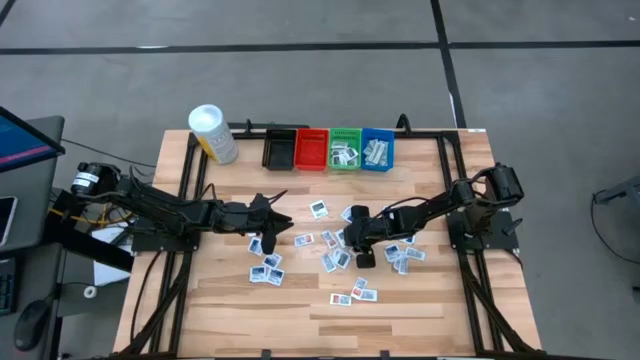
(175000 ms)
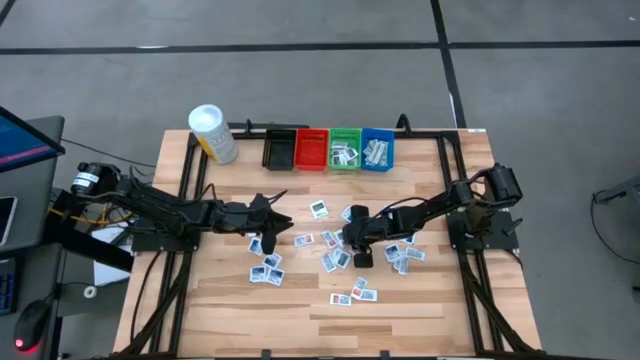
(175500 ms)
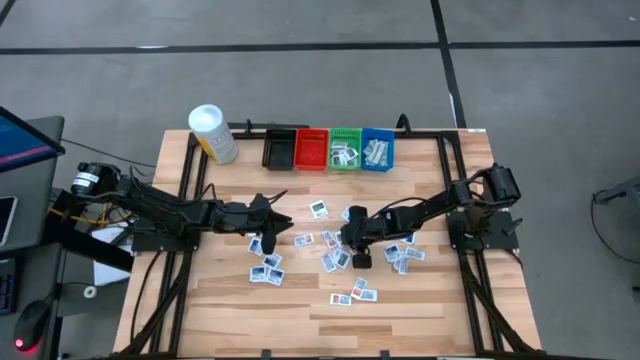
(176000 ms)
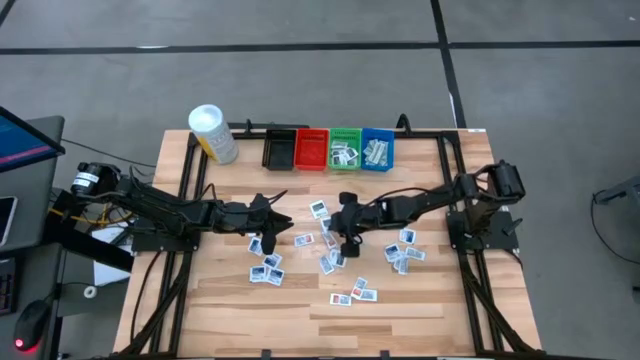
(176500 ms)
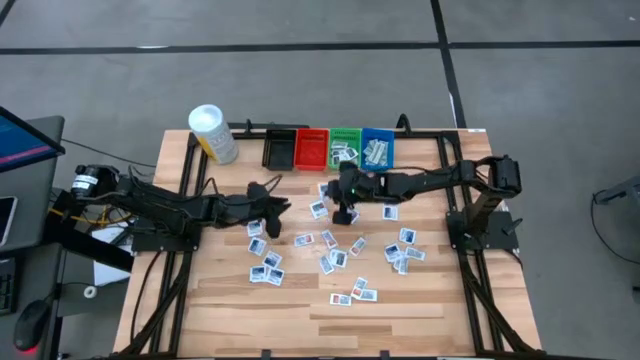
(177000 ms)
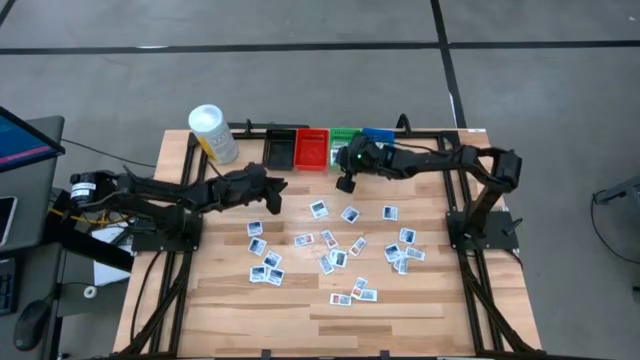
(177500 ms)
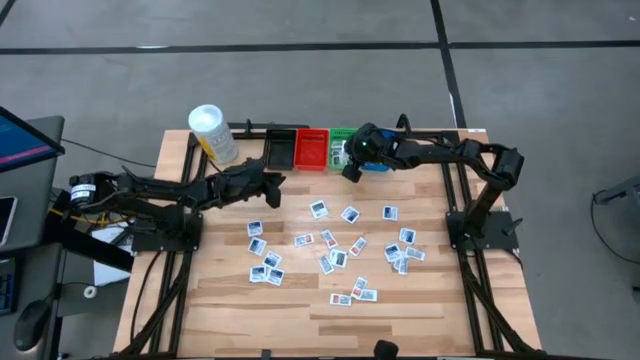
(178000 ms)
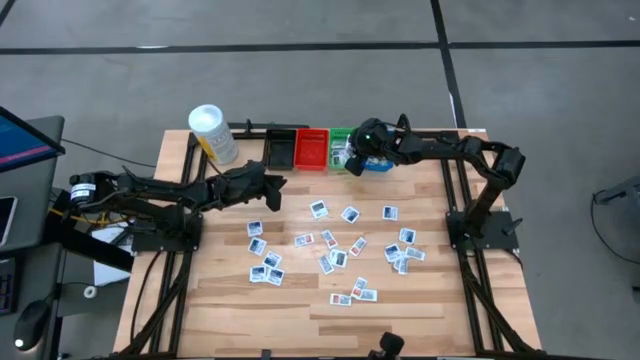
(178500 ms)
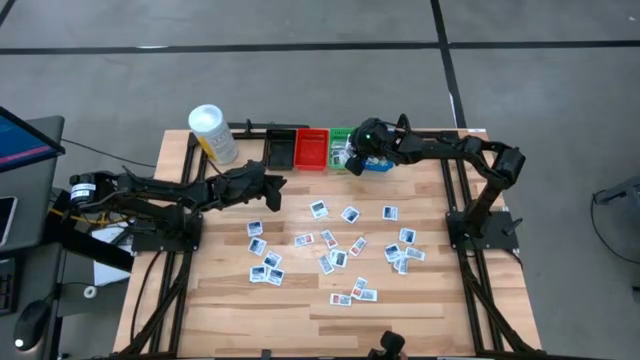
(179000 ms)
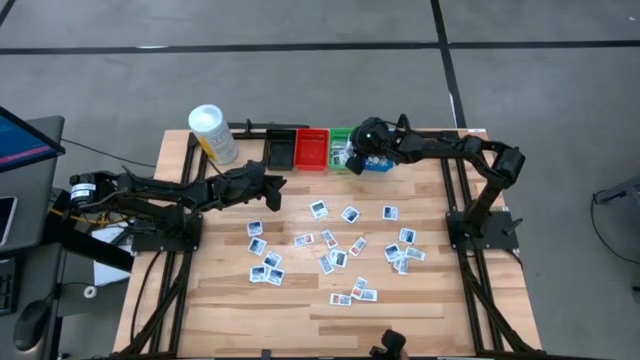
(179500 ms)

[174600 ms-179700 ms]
Task: Pick & Place First Aid Supplies
Put the middle towelette pack into the green bin

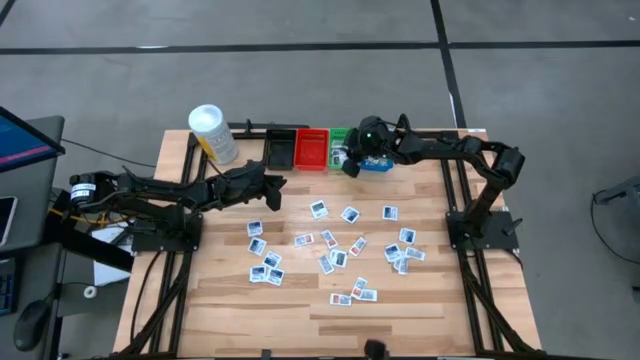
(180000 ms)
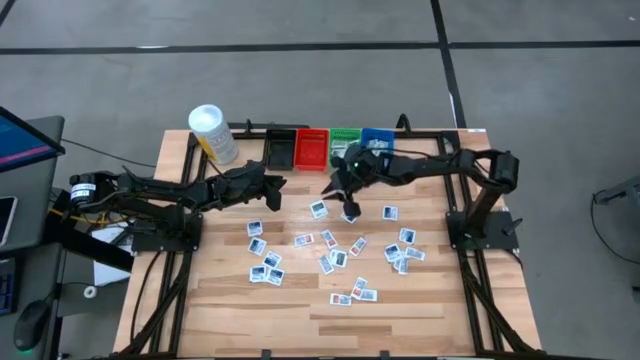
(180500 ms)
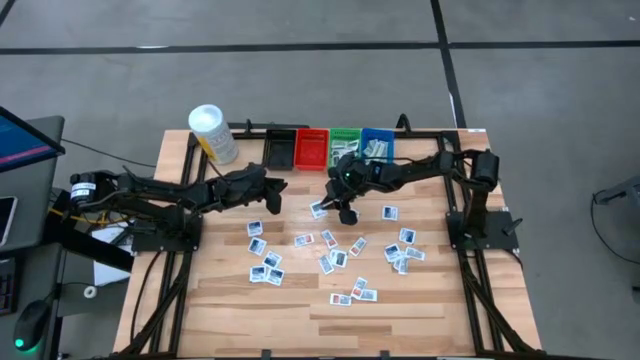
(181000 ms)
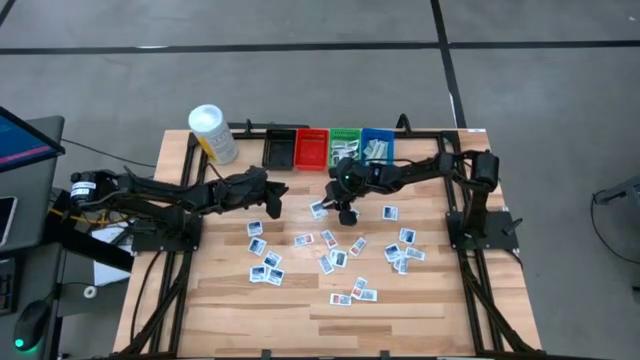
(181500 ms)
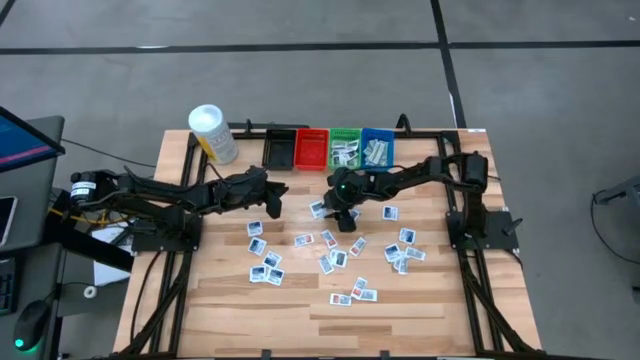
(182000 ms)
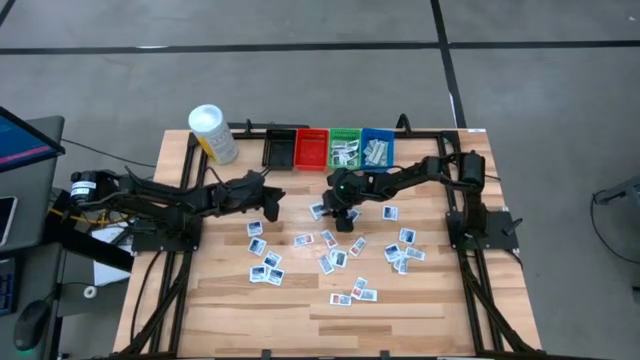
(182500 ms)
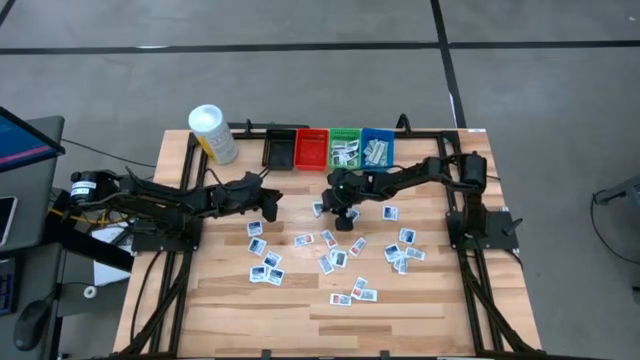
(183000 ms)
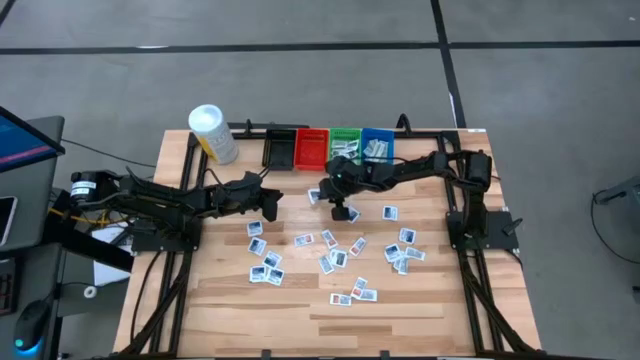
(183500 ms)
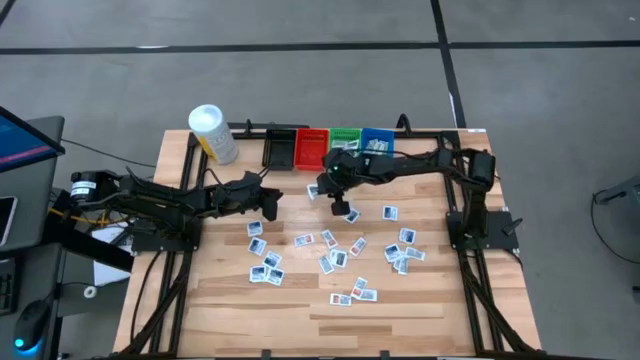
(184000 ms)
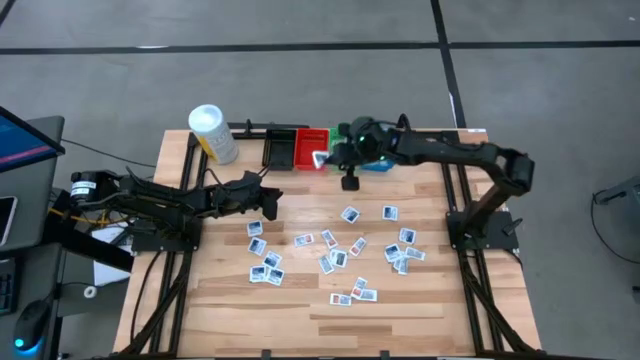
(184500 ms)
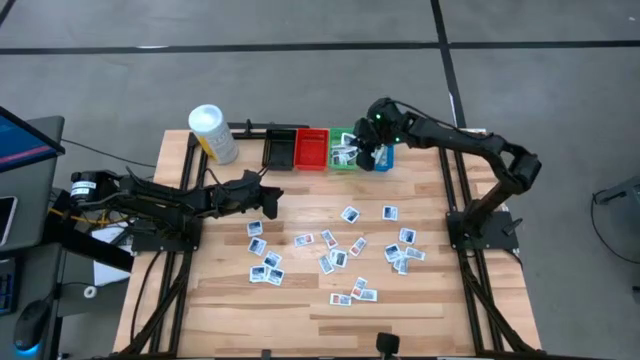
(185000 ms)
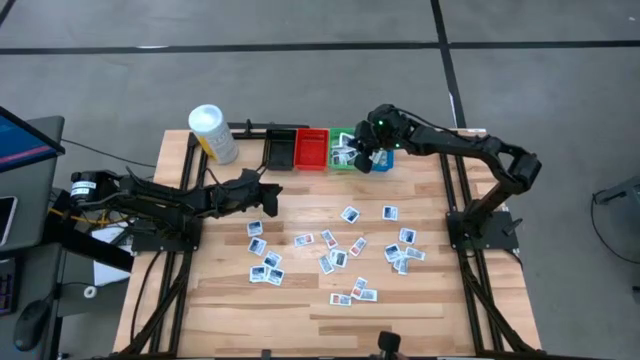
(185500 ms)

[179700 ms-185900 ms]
Put the top towelette pack into the green bin

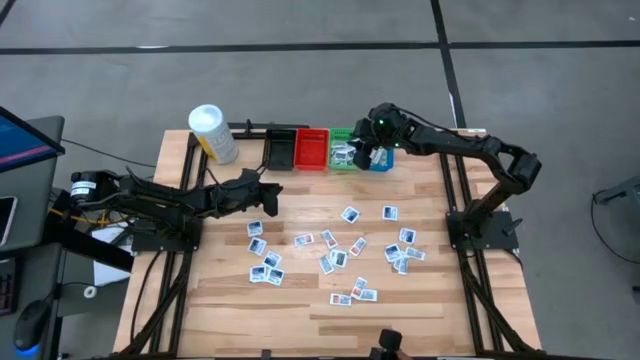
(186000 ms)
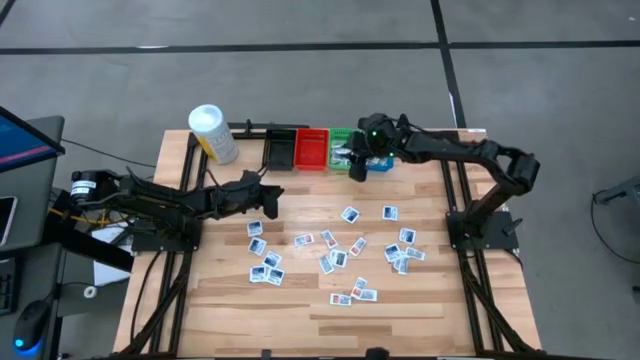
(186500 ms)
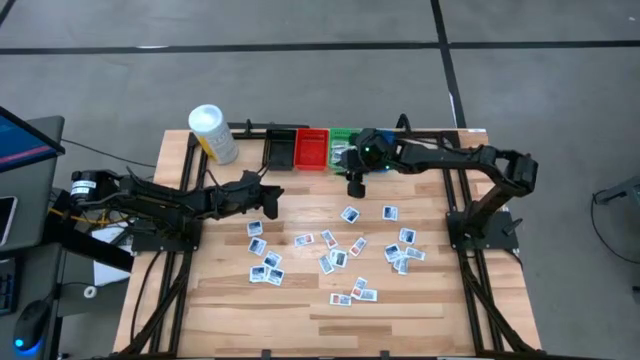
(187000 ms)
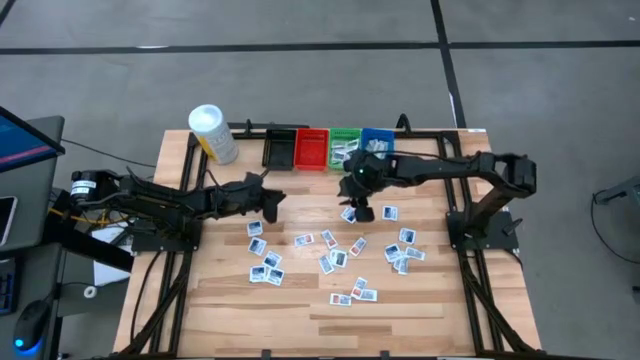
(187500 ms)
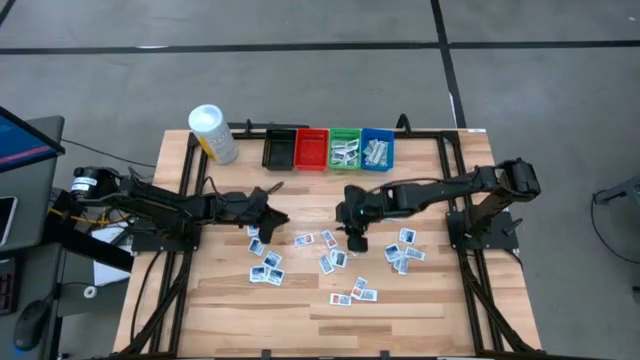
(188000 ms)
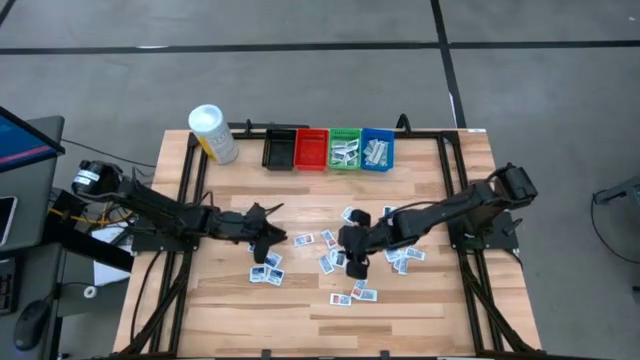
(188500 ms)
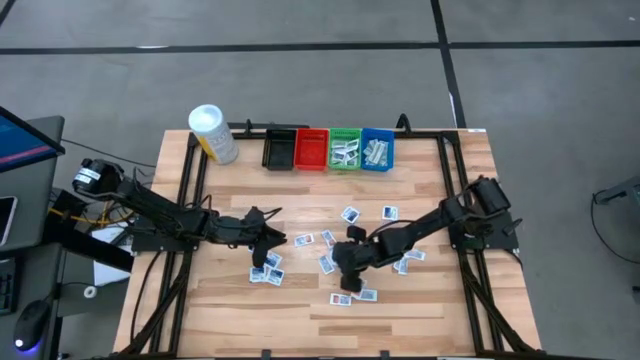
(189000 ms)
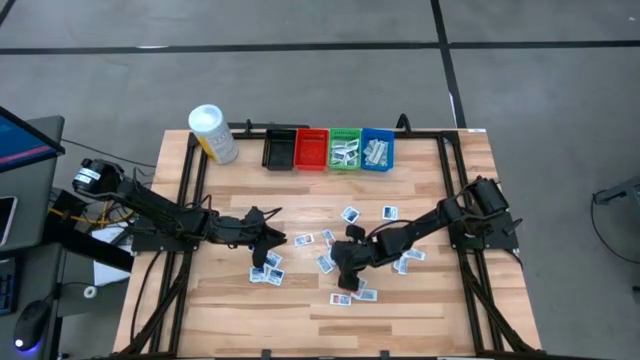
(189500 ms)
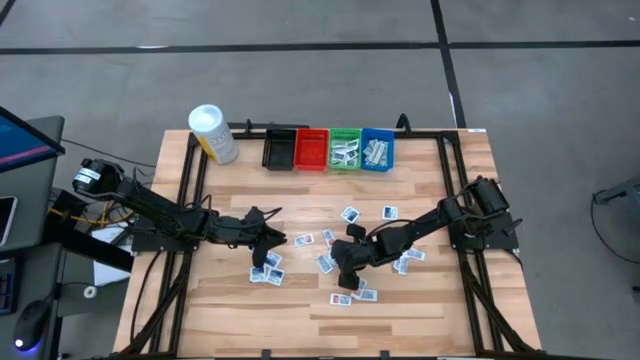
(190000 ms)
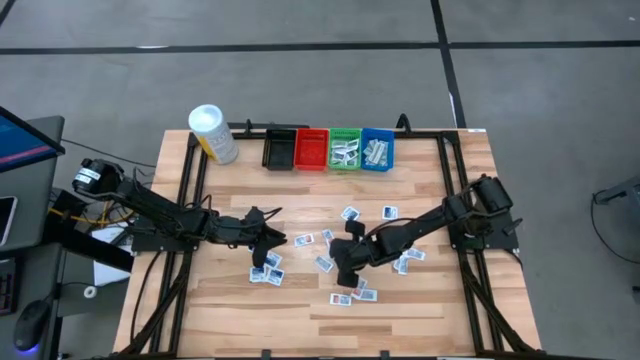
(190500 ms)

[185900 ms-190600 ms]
Put the towelette pack into the green bin

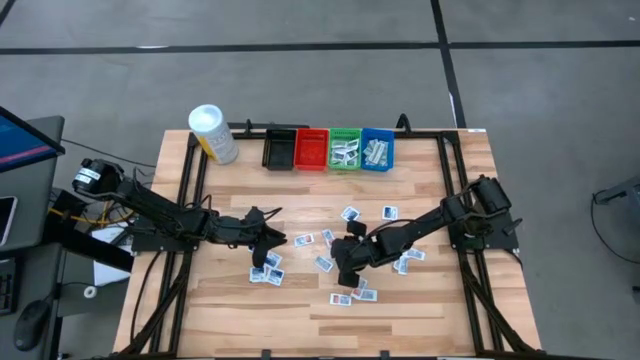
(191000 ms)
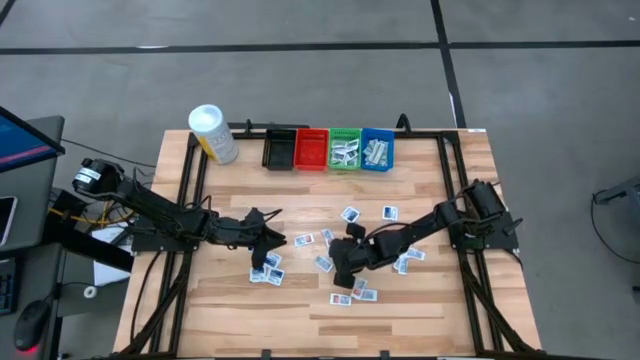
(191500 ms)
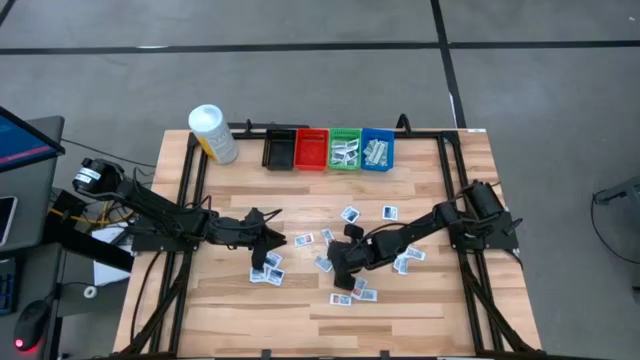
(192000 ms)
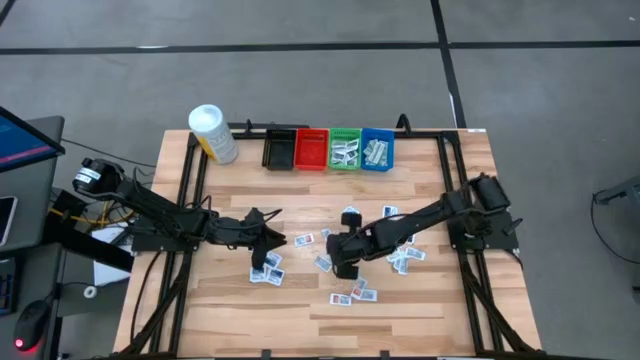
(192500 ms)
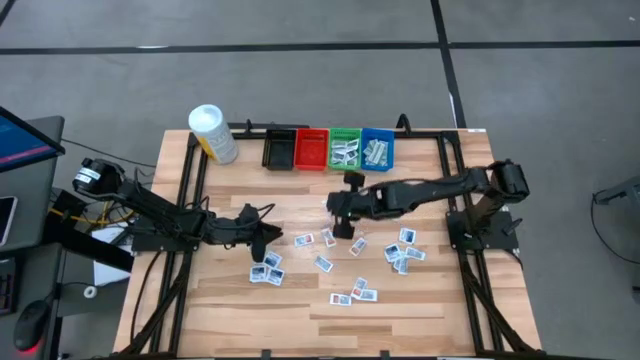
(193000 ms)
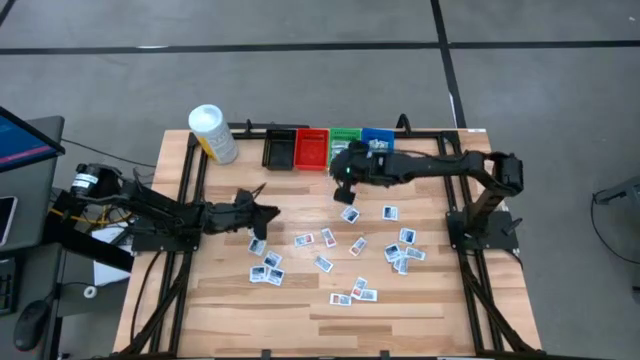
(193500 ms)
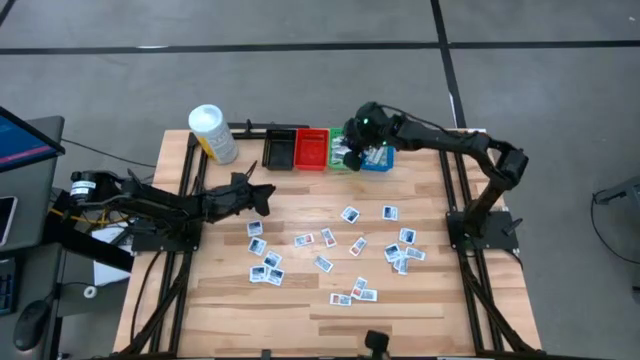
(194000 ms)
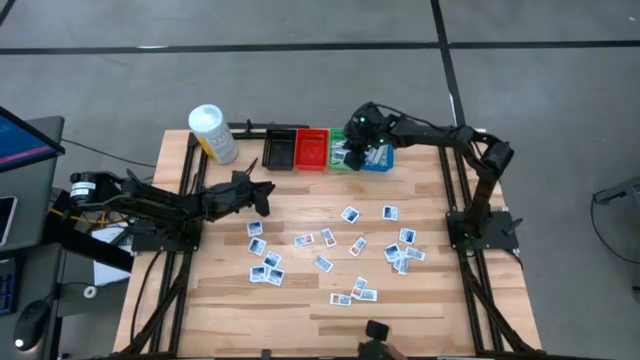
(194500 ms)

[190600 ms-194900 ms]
Put the towelette pack into the green bin

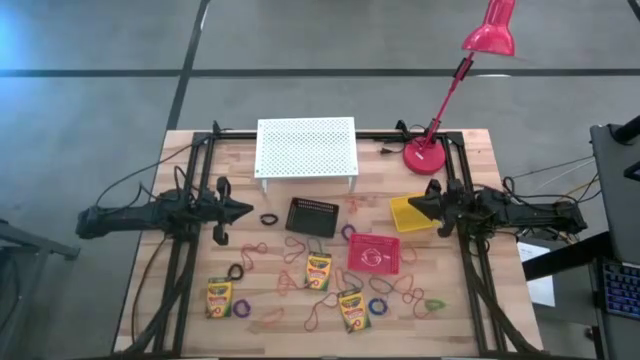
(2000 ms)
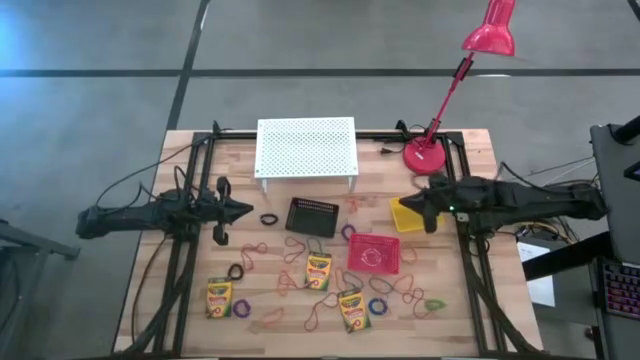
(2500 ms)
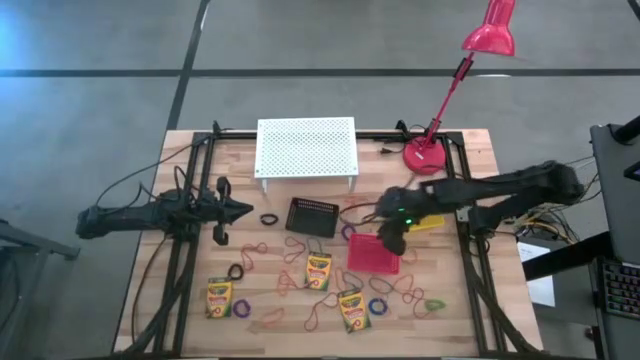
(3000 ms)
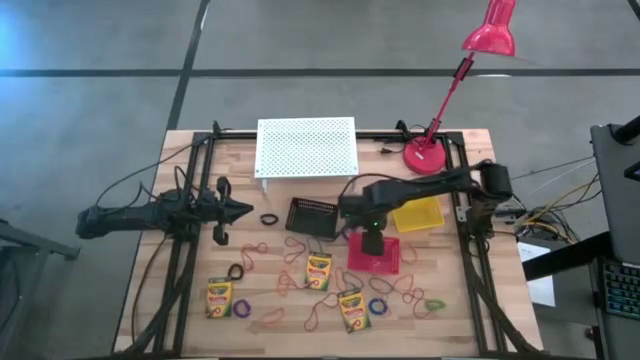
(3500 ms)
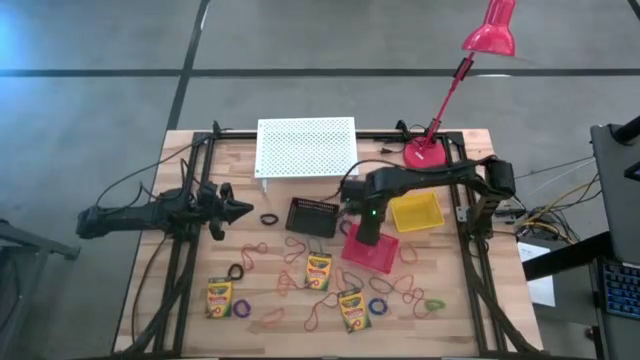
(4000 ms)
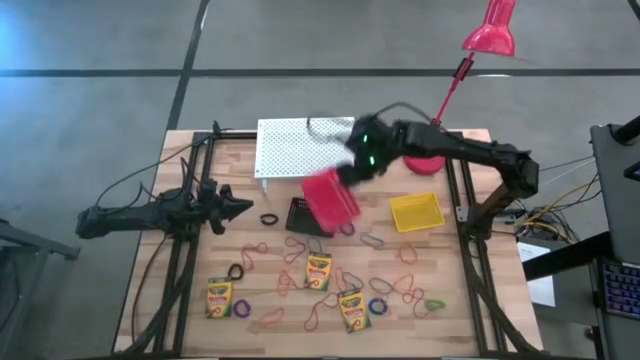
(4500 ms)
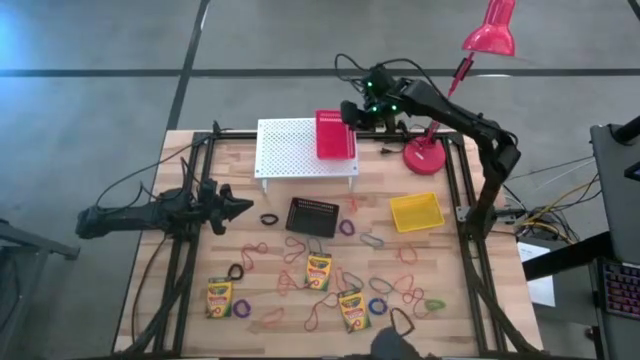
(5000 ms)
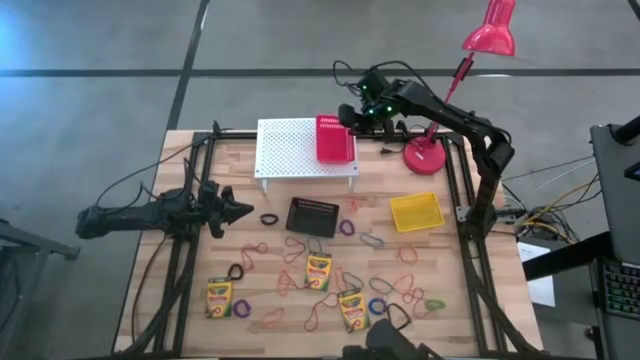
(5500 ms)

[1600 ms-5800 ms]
Task: Pick & Place Office Desk Supplies
Put the red basket on the shelf
